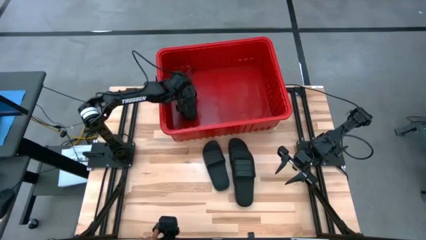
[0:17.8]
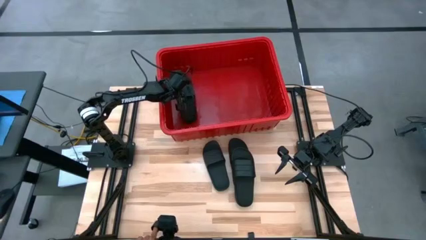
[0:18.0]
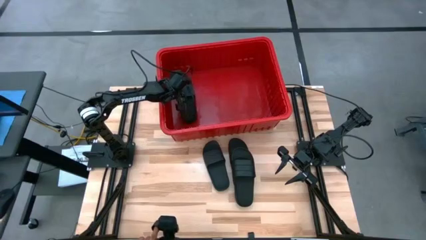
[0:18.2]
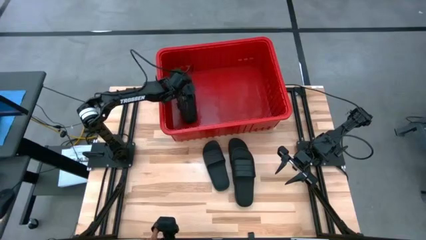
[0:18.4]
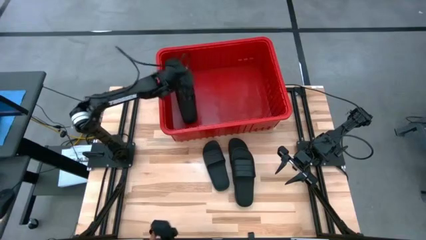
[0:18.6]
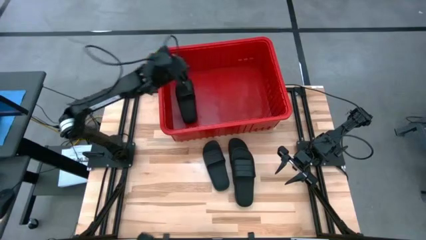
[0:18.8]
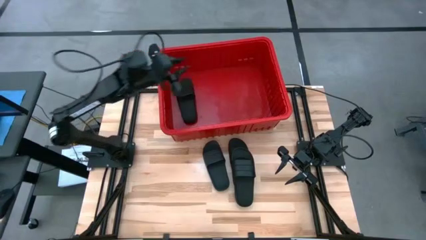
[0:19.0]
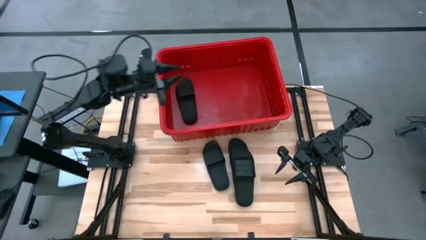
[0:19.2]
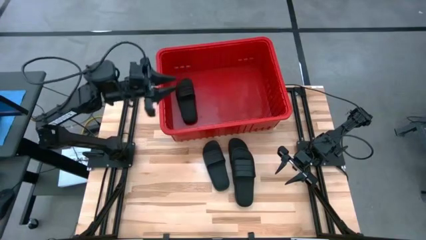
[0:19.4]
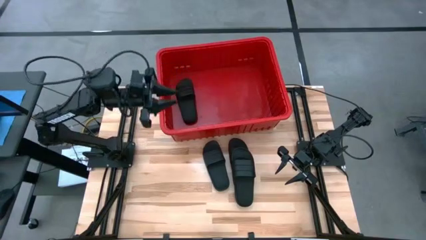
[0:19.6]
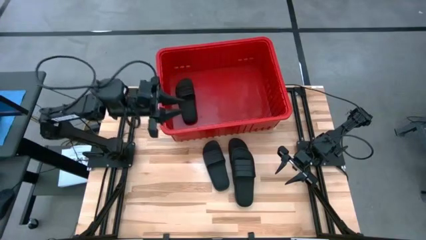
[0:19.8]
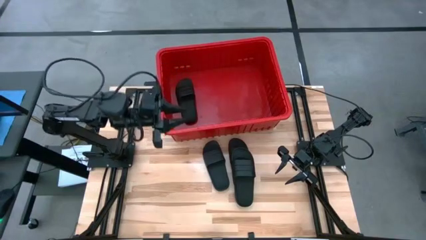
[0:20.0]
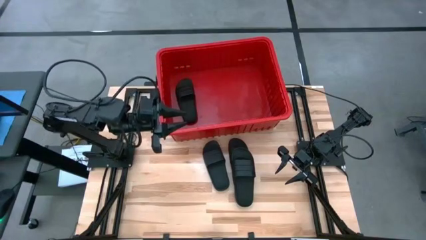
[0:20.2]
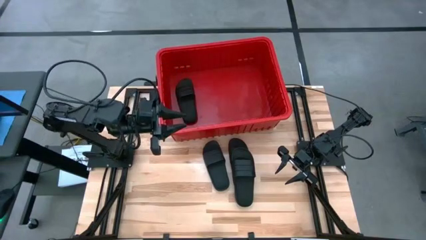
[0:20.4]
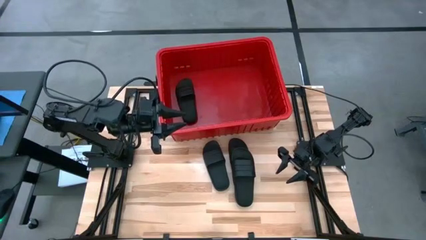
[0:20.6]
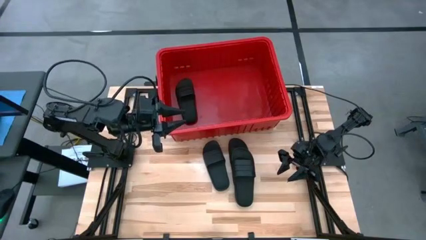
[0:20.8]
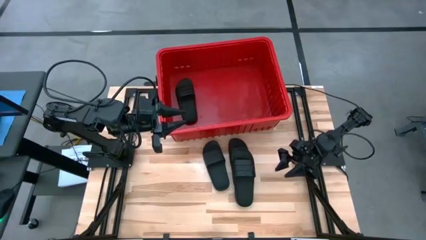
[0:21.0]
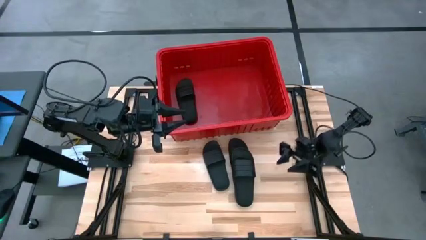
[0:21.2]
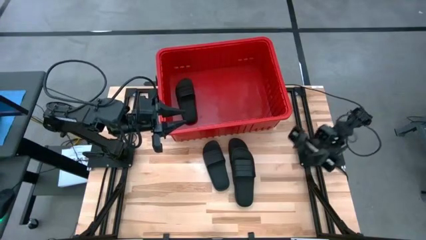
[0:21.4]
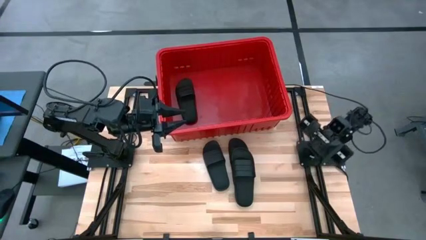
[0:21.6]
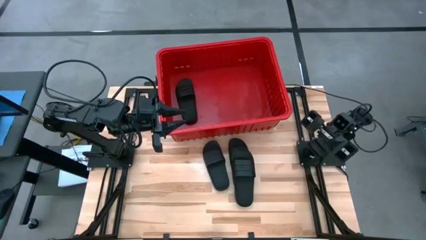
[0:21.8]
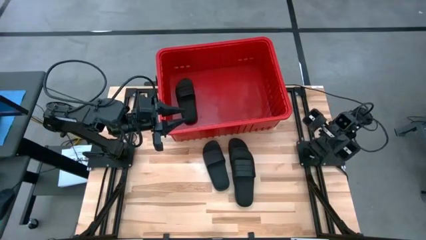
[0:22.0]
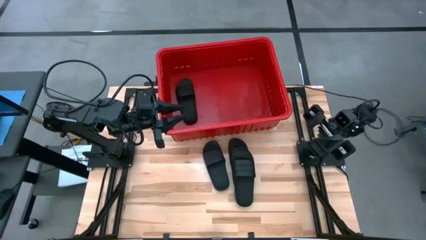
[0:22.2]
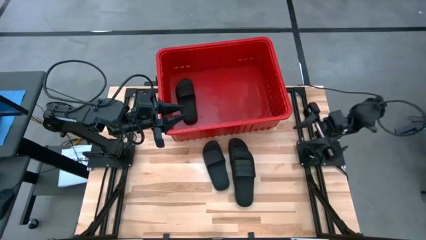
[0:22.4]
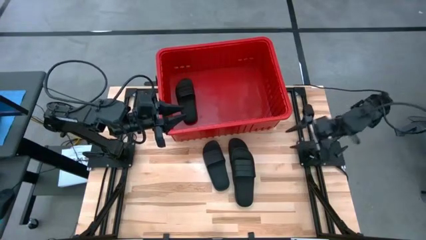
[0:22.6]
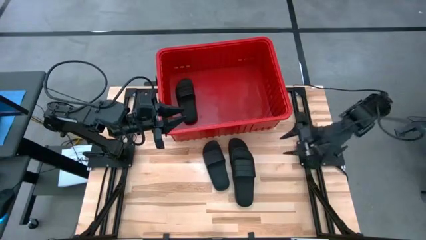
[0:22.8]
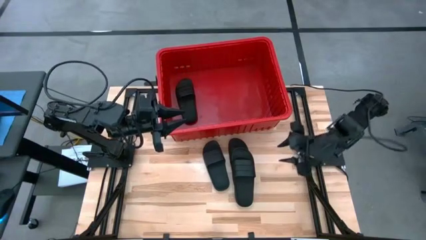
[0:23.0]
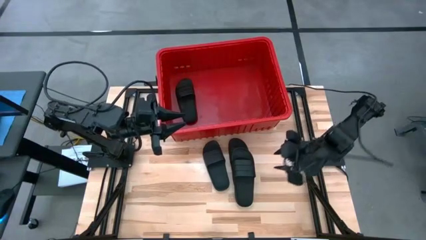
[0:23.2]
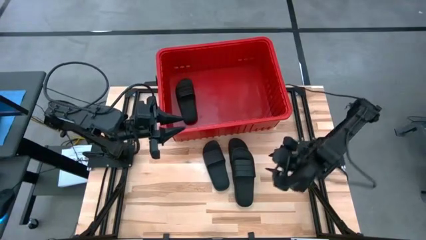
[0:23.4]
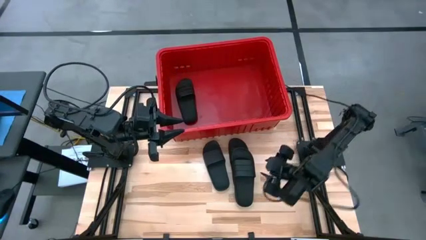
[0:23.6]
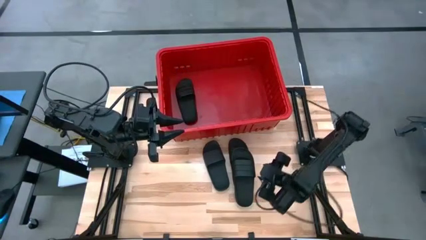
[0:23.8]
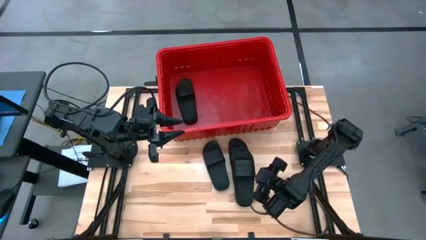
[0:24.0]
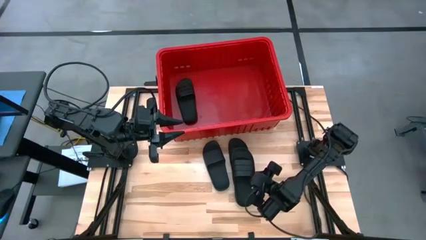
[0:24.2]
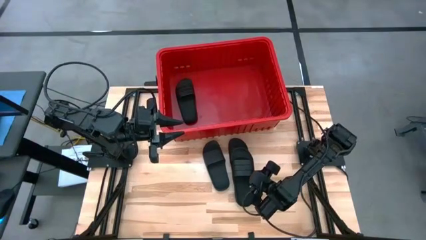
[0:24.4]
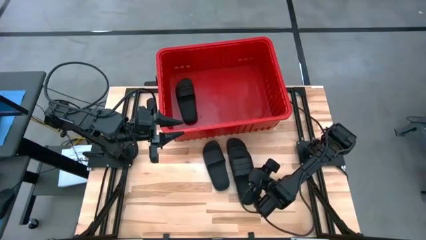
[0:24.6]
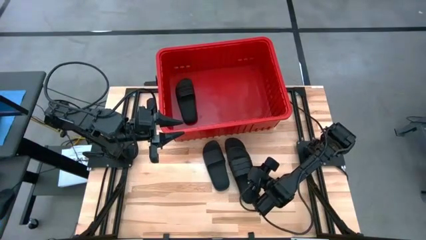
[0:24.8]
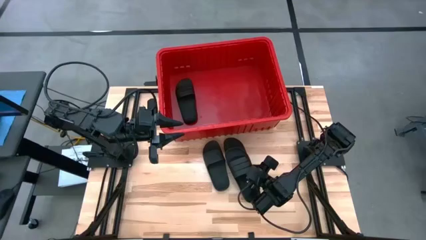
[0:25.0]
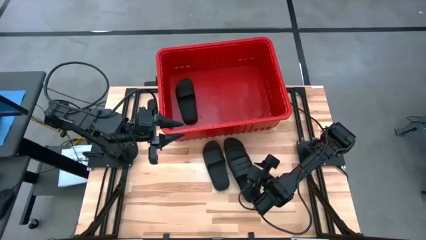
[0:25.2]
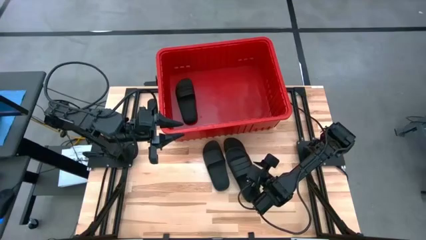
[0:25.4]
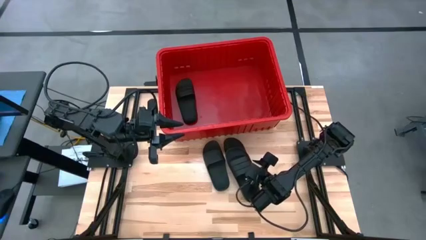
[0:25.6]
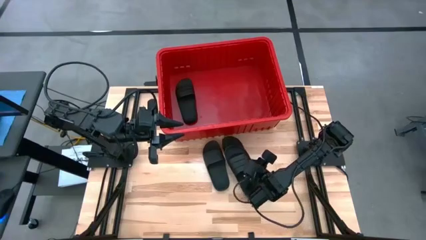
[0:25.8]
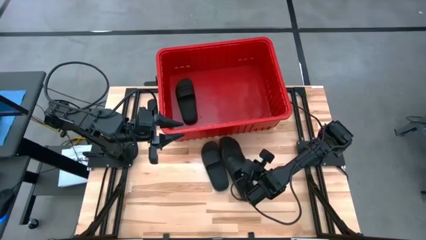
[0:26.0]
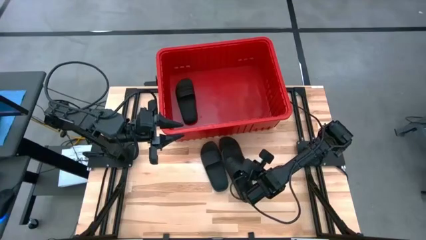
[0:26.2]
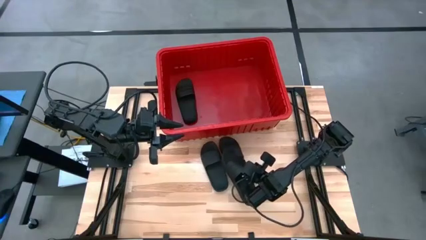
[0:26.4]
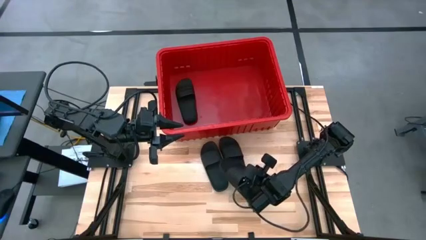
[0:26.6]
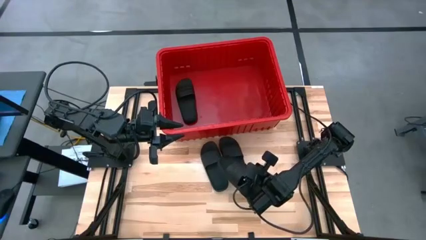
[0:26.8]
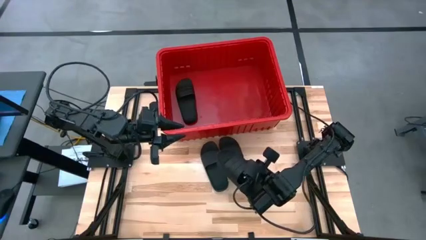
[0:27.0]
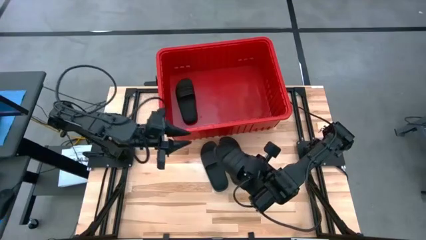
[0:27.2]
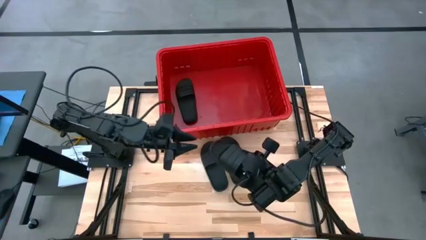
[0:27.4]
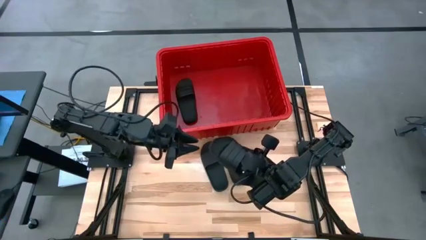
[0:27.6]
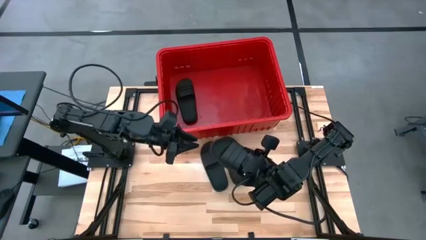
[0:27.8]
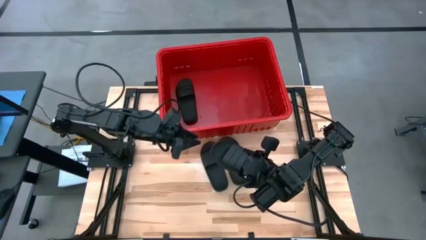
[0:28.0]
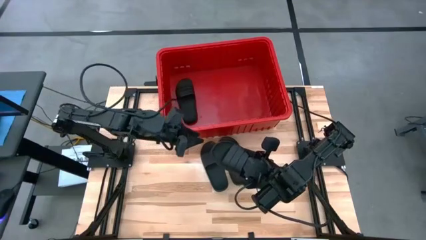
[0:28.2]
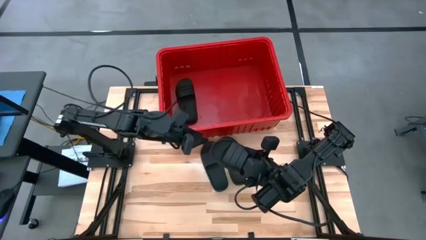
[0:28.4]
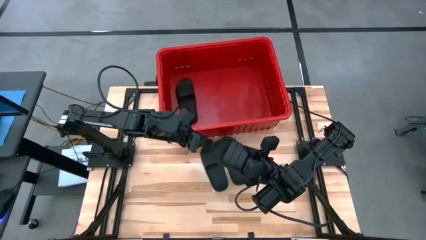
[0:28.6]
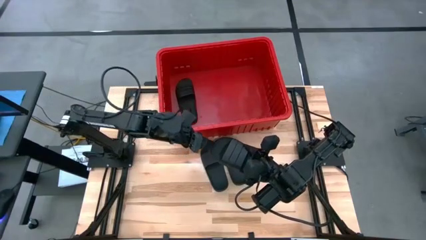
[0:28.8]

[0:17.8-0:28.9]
Task: Pick and place slides into bin
Put the black slides into the red bin
